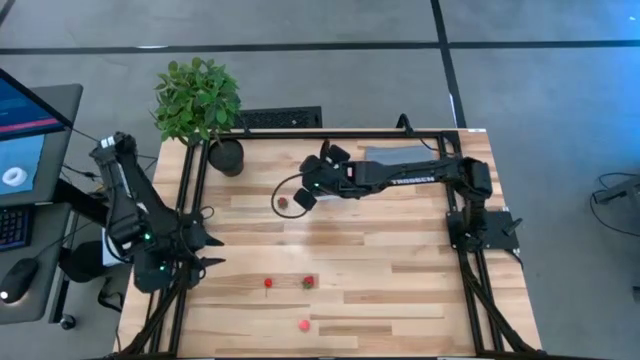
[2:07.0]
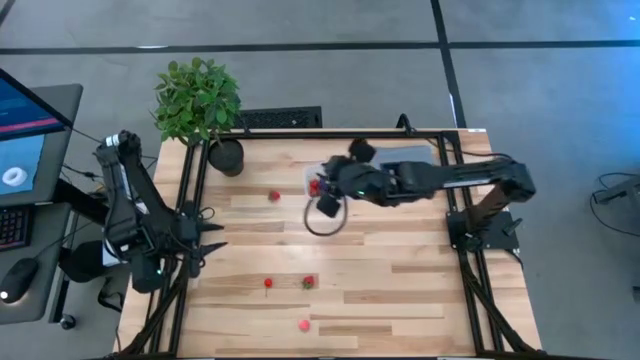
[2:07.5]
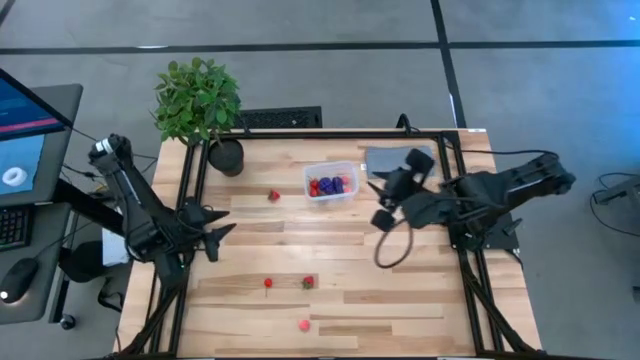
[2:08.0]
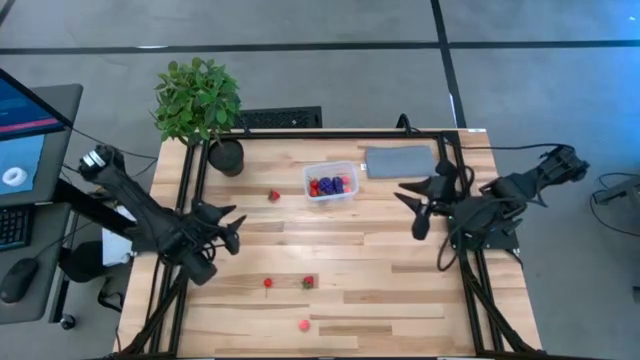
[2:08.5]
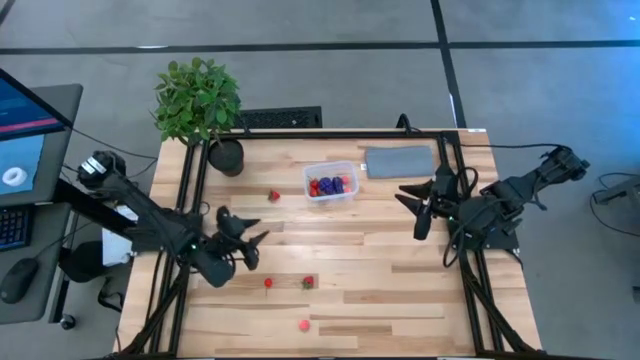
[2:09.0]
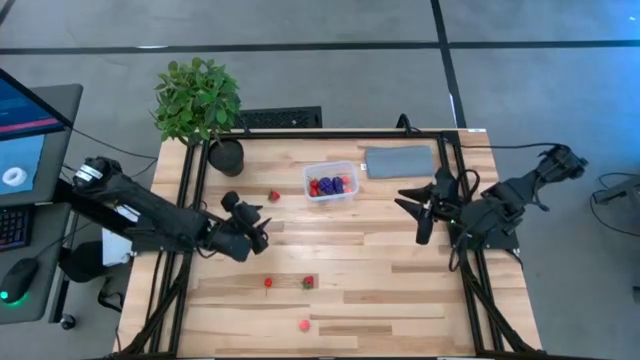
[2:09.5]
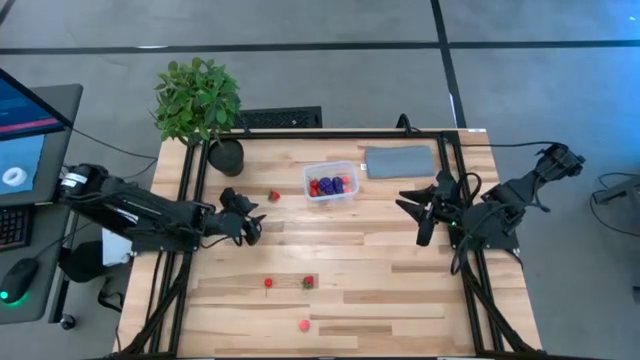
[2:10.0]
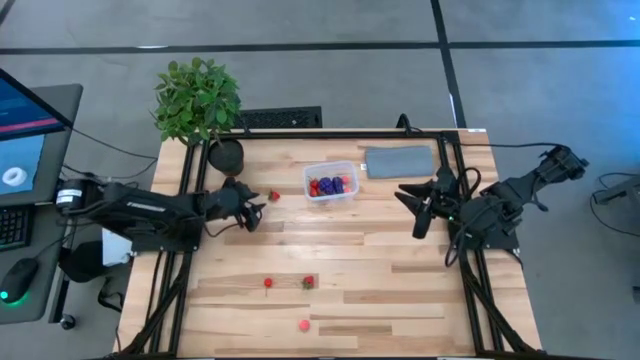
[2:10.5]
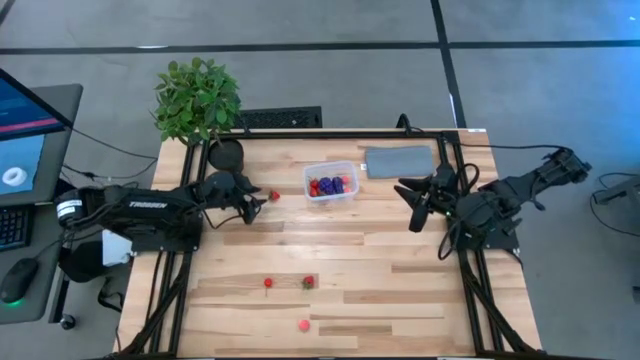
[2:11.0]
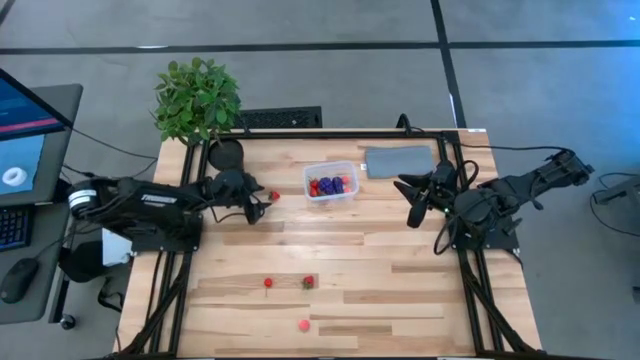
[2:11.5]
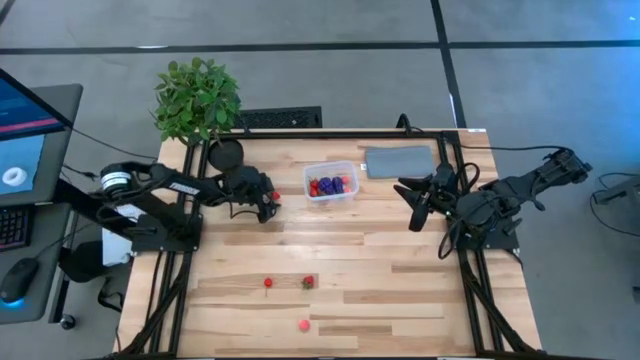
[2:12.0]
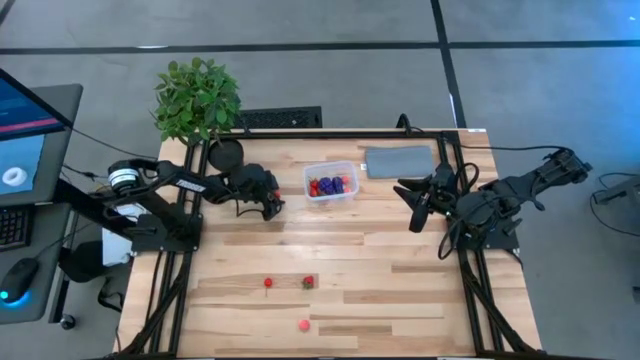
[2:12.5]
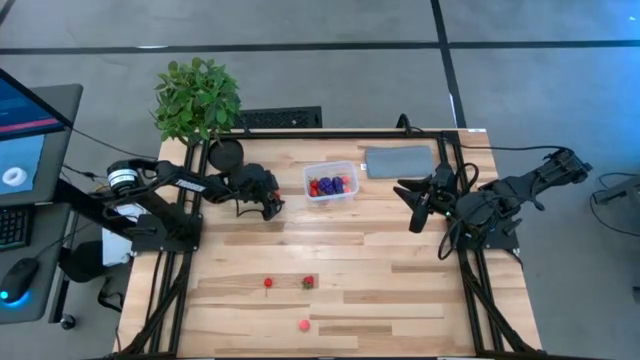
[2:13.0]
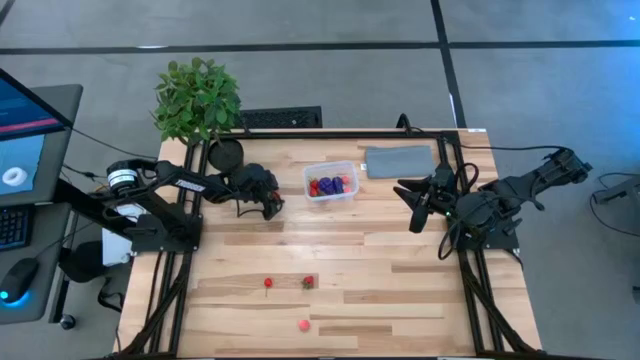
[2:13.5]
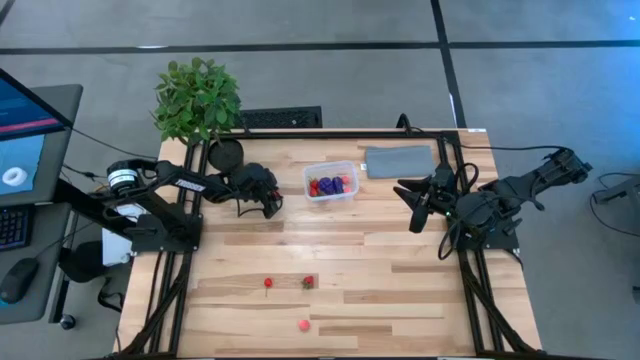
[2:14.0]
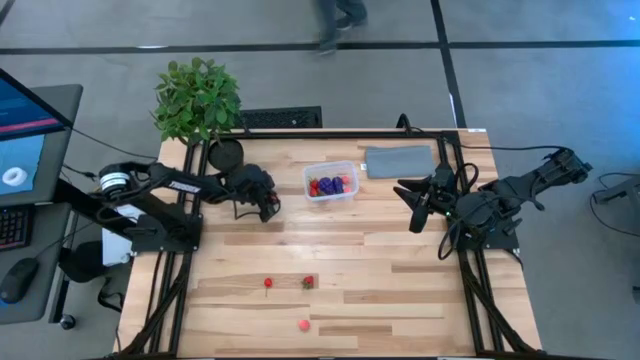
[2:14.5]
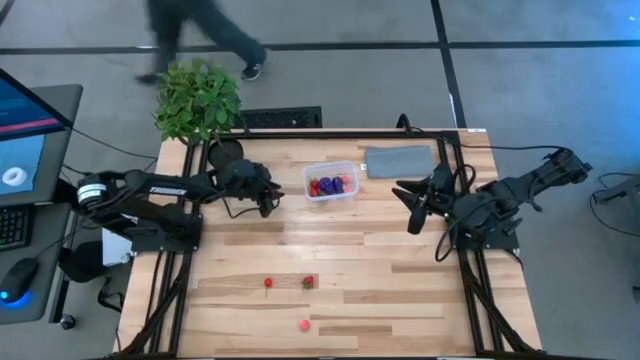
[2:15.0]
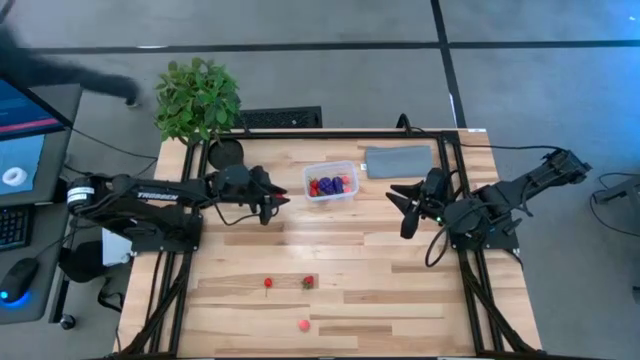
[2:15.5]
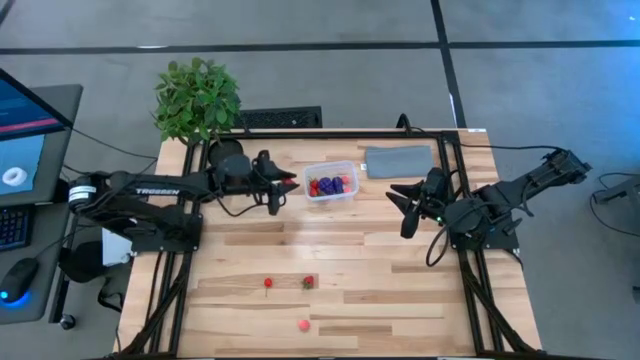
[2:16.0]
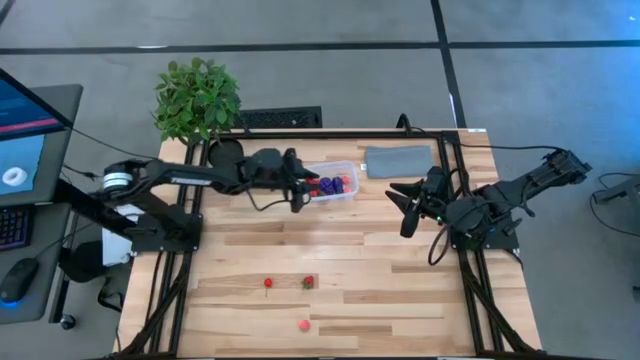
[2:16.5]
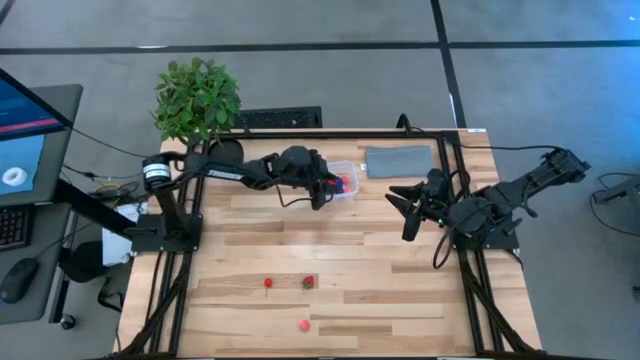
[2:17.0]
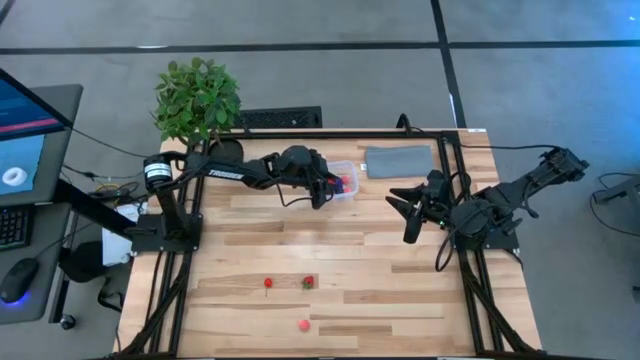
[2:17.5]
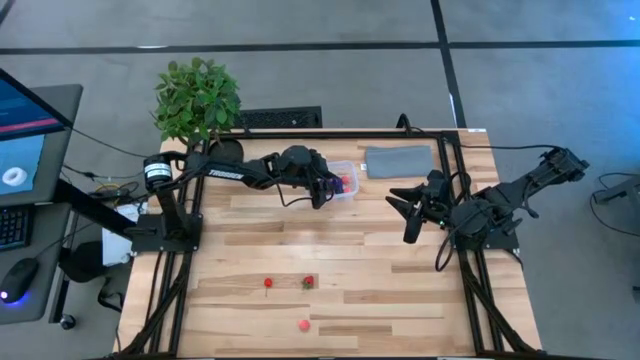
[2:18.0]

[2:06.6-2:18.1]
Task: Pick and placing Produce into tupperware
Put the strawberry into the container

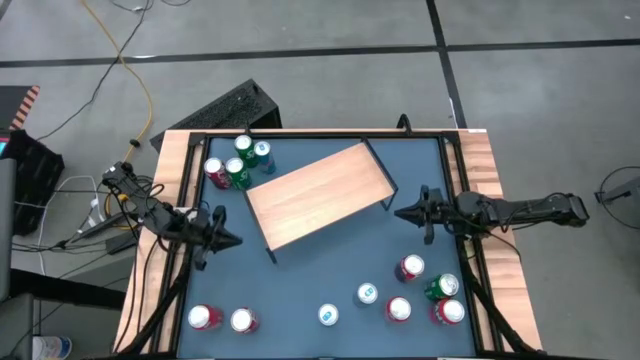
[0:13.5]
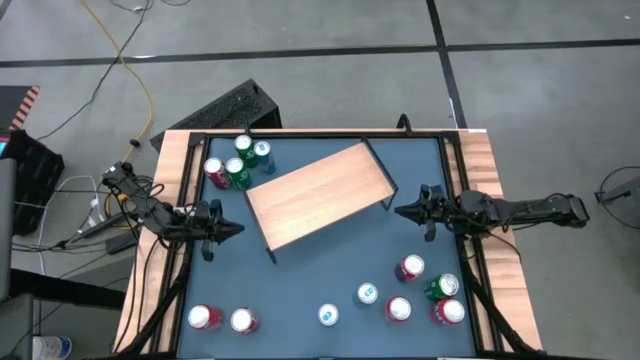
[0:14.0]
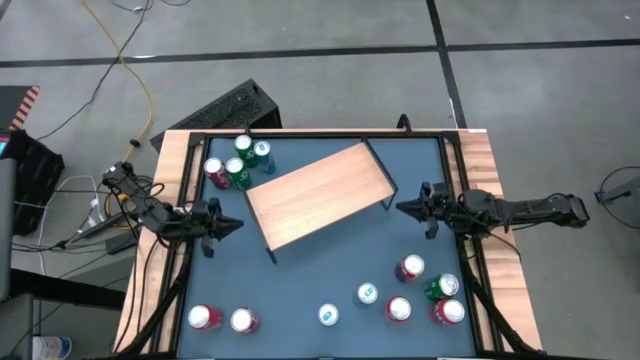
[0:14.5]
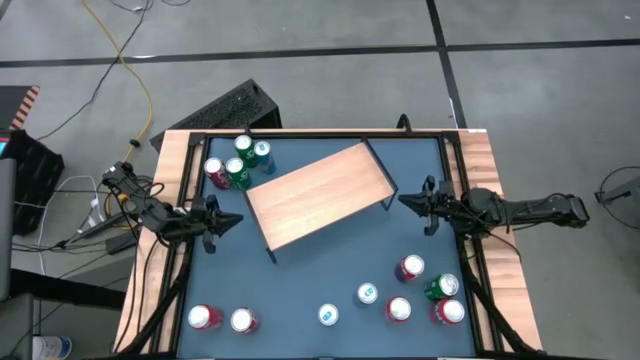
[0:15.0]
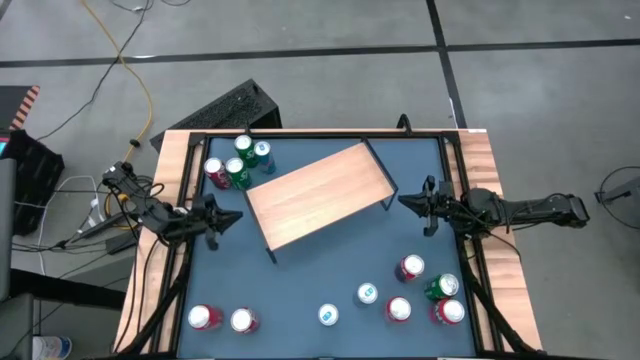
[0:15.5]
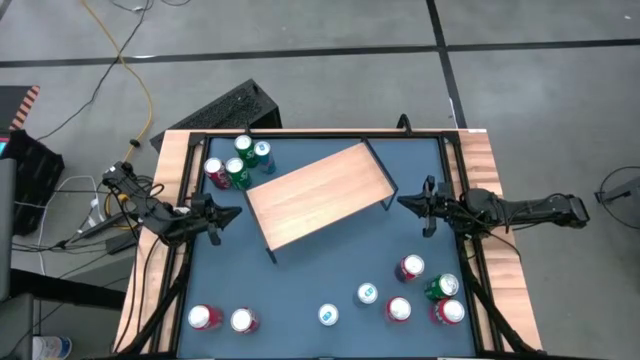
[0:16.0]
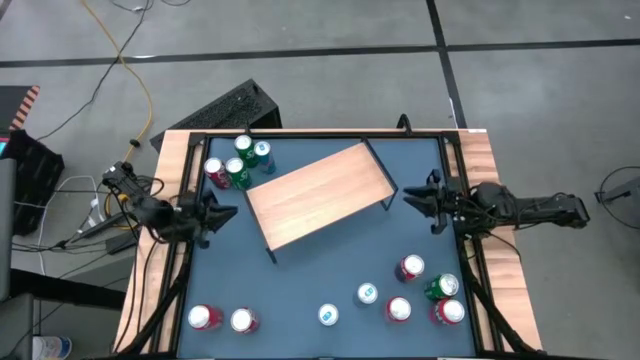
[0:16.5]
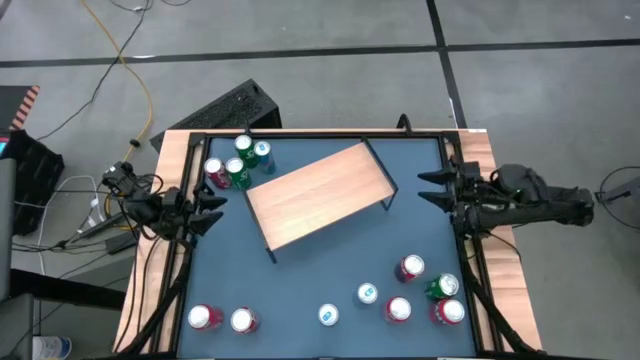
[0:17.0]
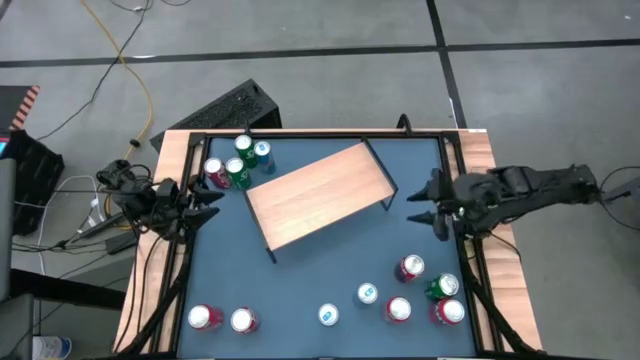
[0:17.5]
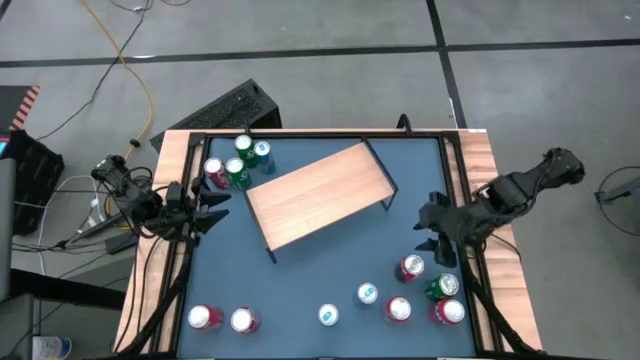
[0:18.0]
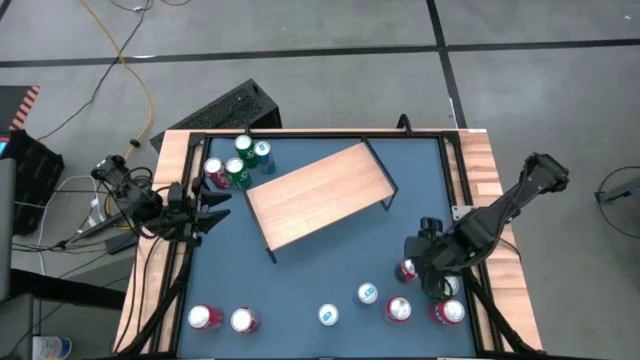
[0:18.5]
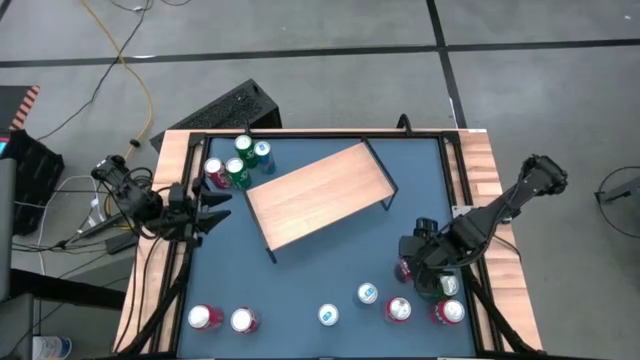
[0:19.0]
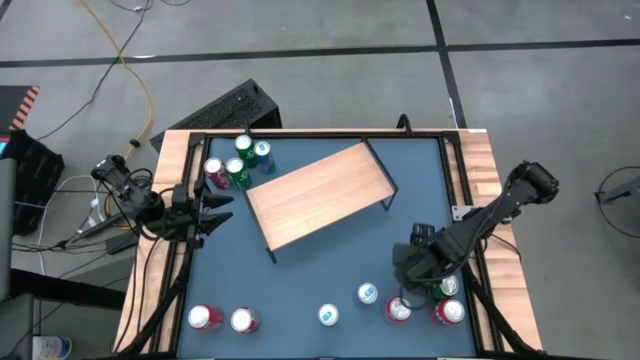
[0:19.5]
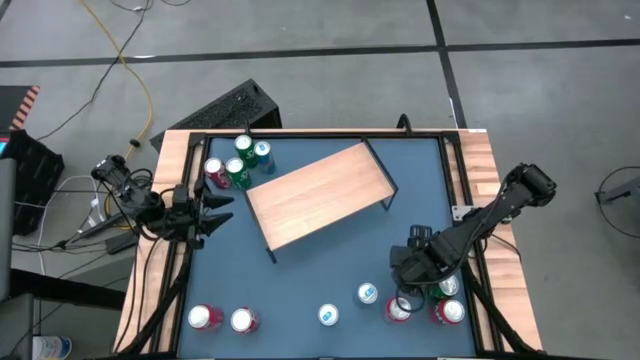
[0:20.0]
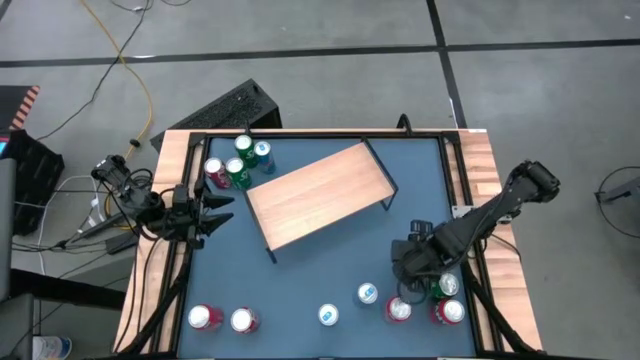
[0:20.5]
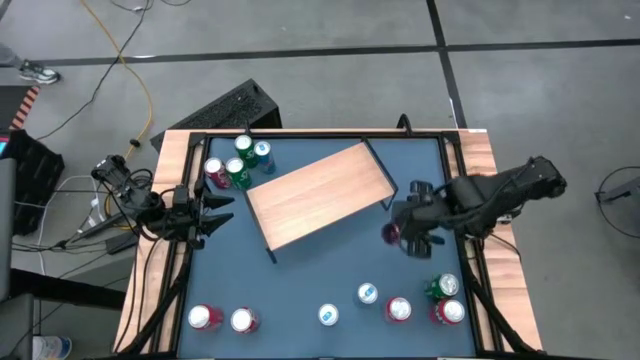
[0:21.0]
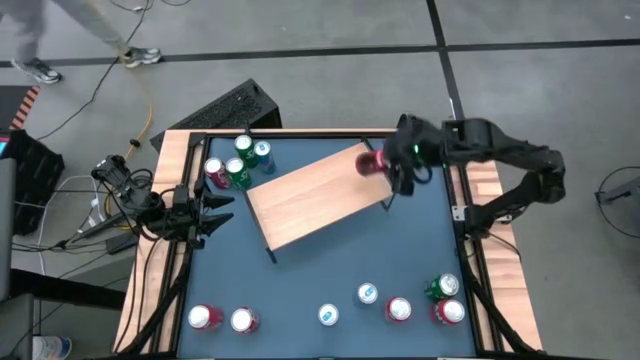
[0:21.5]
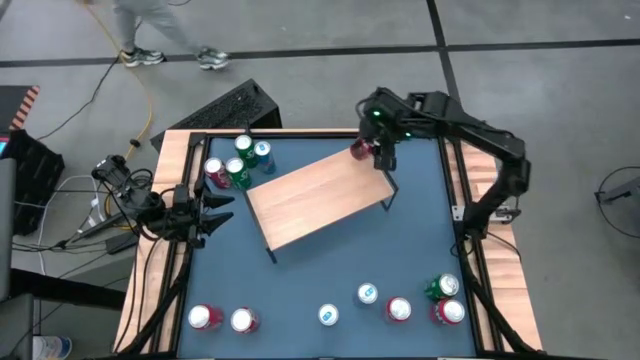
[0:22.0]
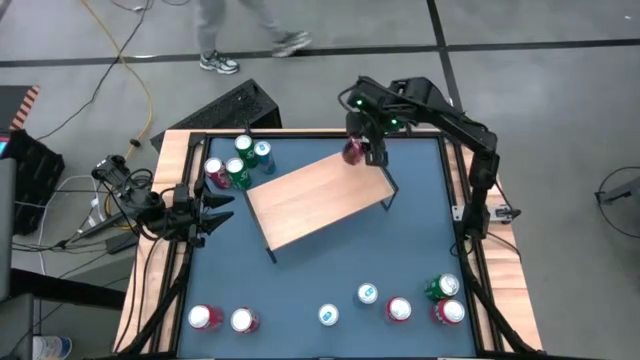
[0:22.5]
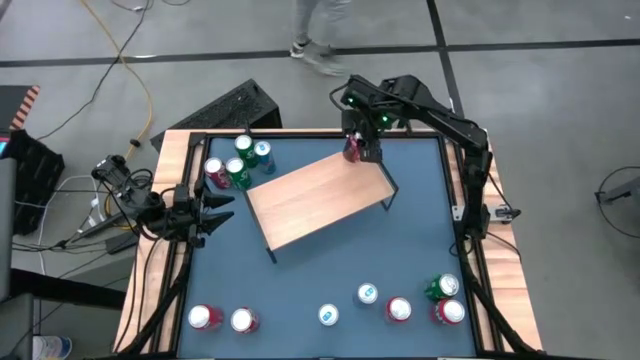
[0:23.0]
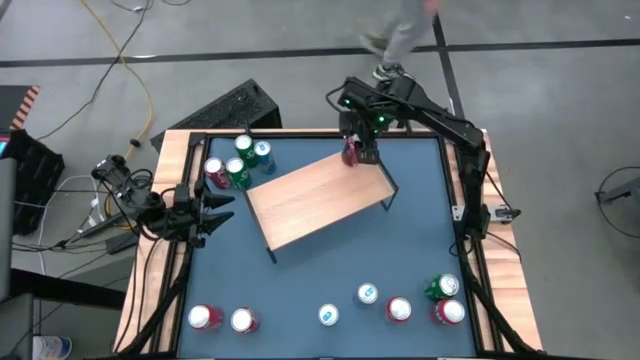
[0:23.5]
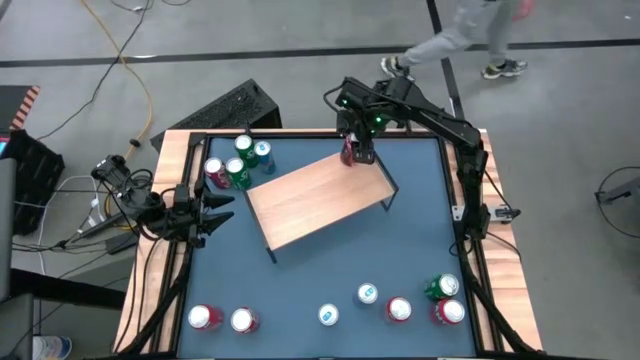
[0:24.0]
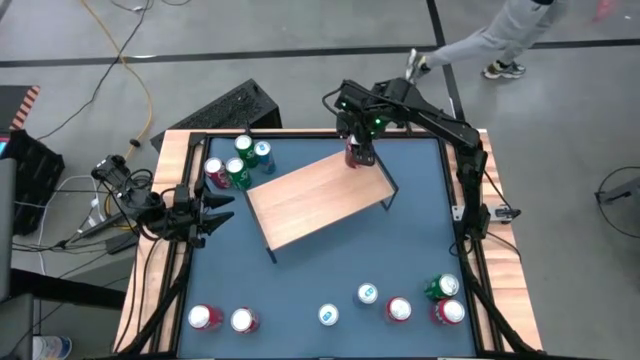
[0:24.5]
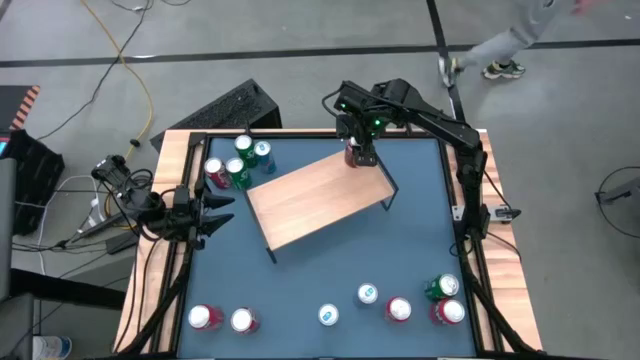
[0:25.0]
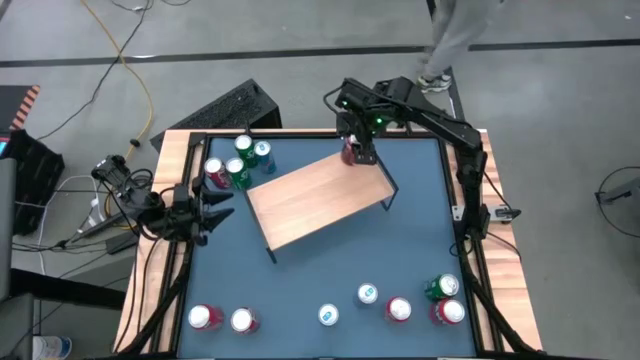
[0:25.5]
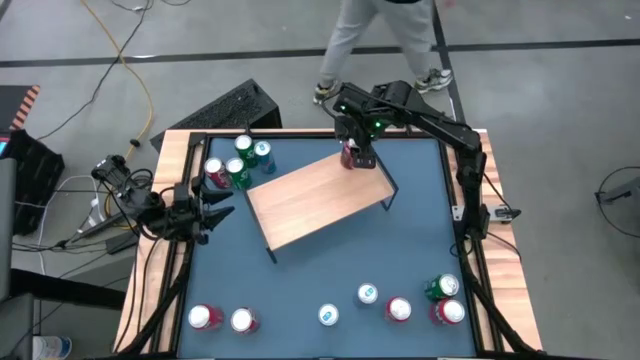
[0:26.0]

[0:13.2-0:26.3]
Task: Place canned beverage on shelf
Put the middle red white soda can on the shelf
